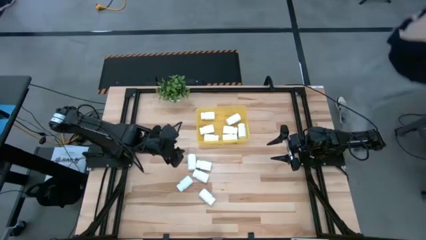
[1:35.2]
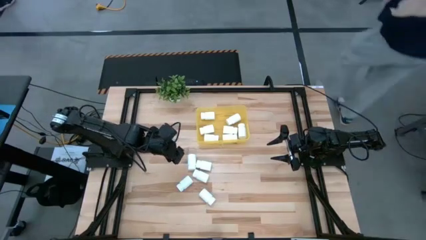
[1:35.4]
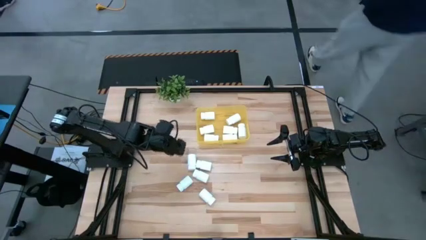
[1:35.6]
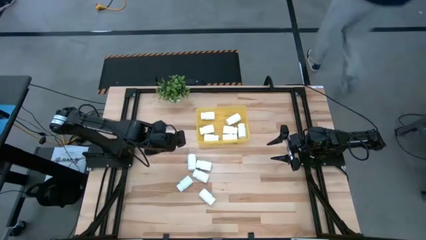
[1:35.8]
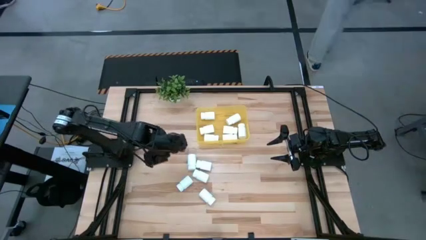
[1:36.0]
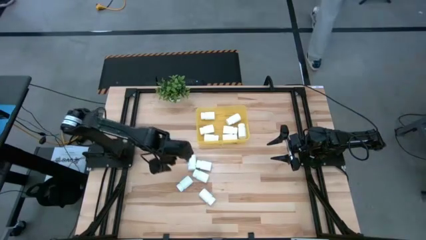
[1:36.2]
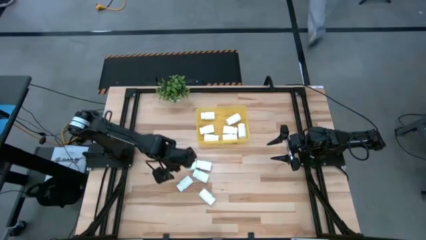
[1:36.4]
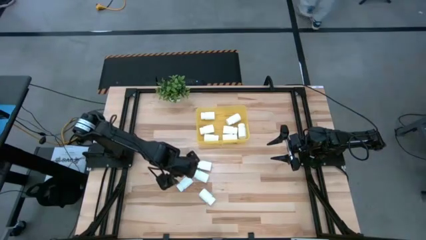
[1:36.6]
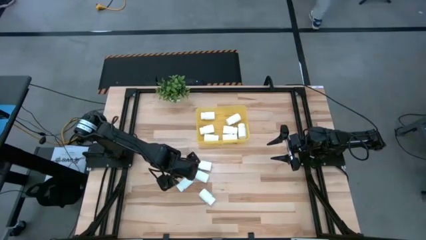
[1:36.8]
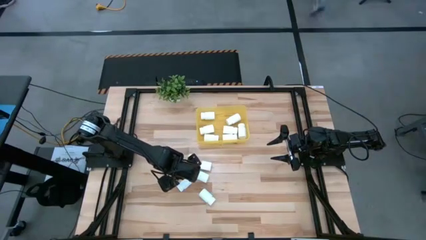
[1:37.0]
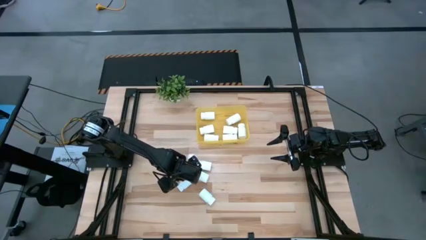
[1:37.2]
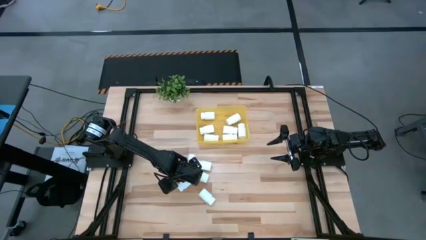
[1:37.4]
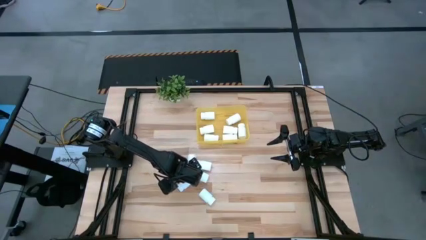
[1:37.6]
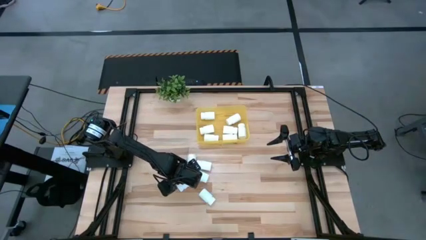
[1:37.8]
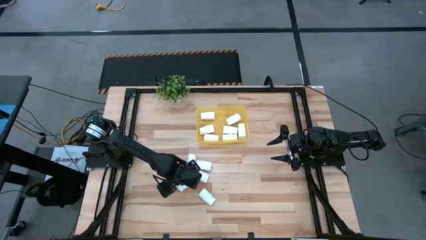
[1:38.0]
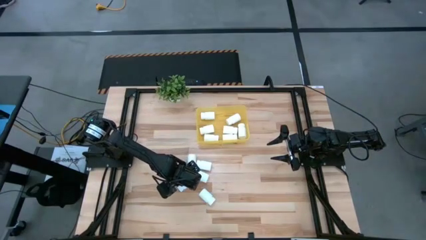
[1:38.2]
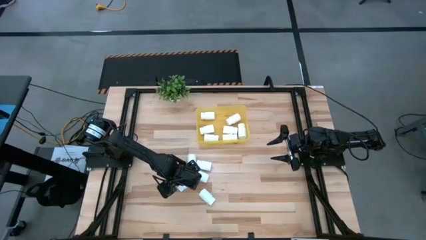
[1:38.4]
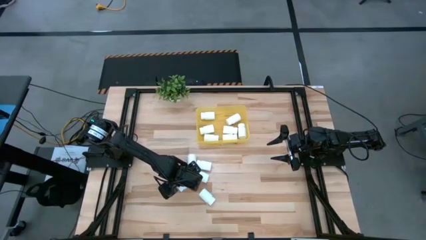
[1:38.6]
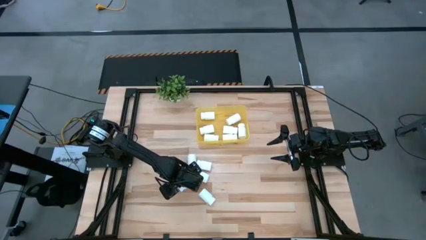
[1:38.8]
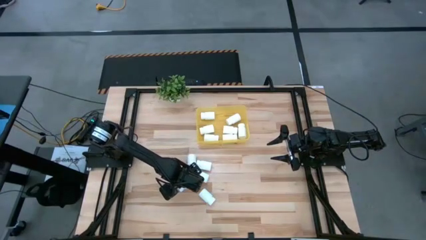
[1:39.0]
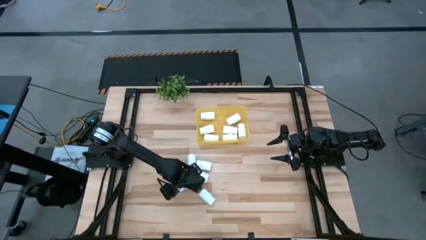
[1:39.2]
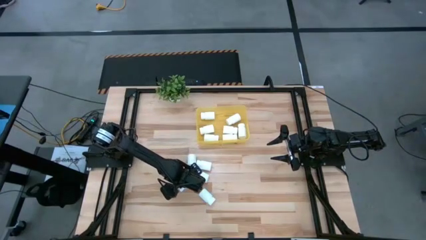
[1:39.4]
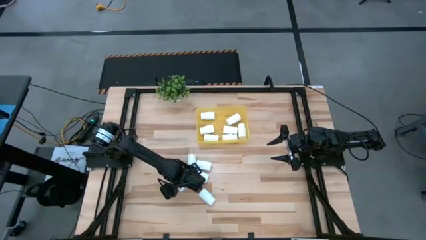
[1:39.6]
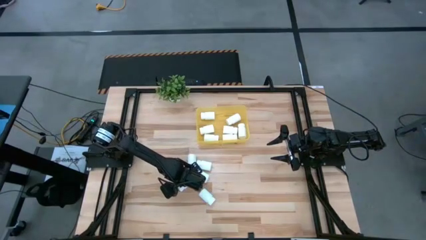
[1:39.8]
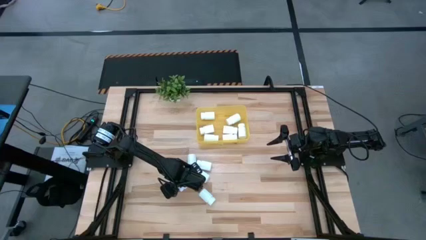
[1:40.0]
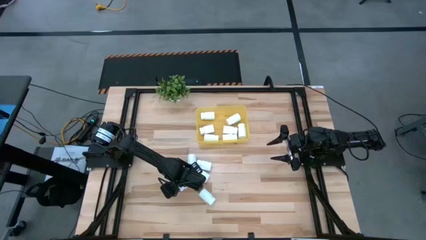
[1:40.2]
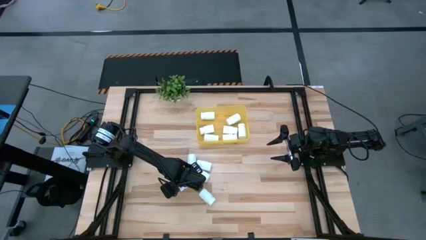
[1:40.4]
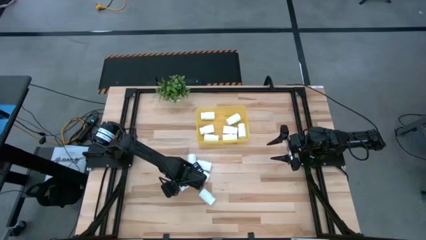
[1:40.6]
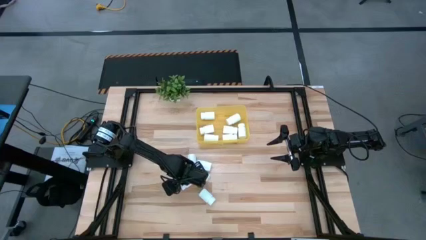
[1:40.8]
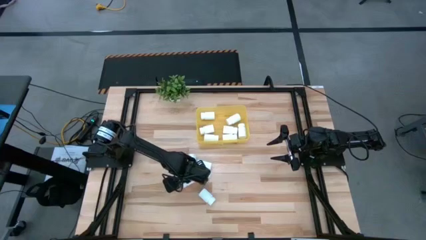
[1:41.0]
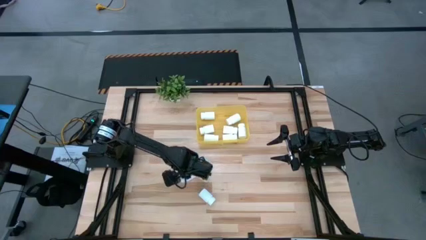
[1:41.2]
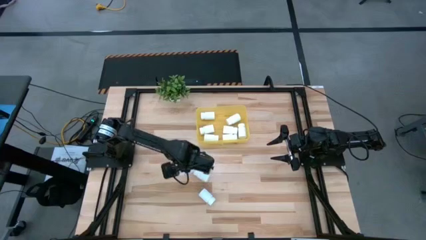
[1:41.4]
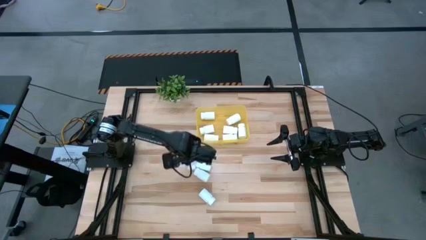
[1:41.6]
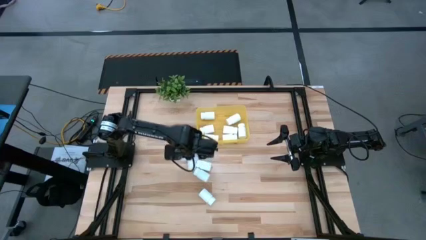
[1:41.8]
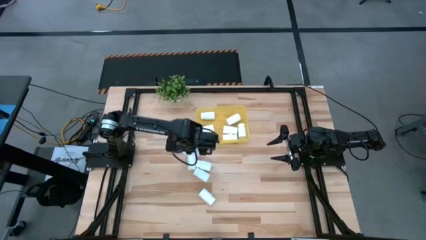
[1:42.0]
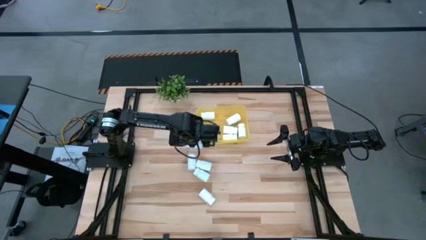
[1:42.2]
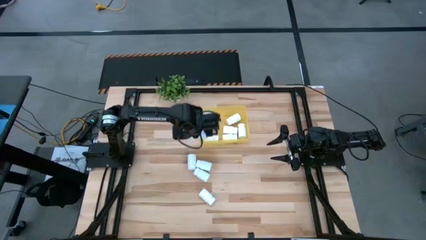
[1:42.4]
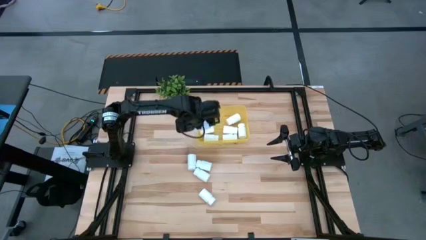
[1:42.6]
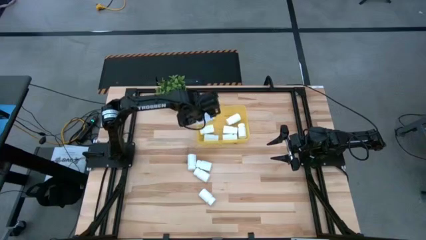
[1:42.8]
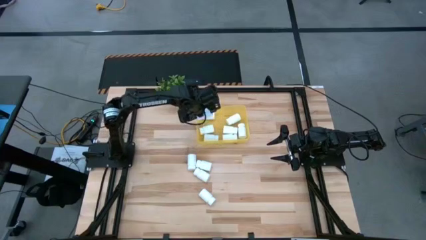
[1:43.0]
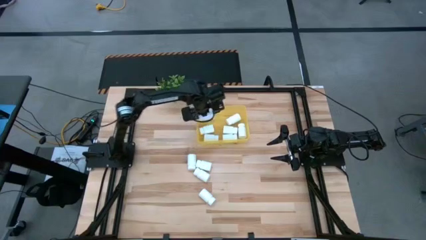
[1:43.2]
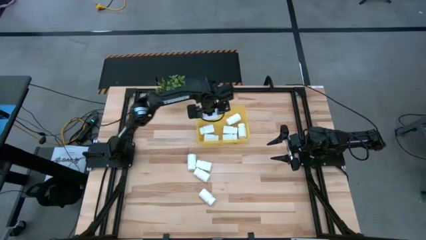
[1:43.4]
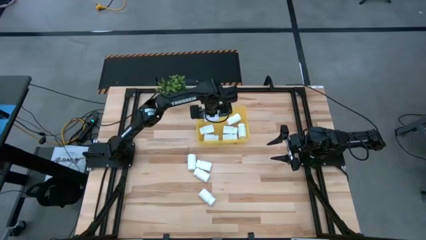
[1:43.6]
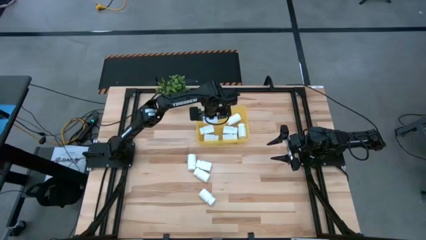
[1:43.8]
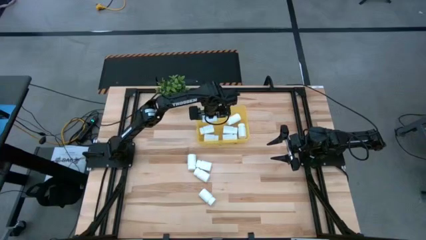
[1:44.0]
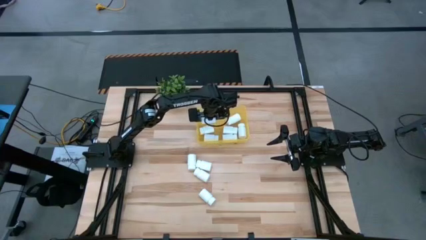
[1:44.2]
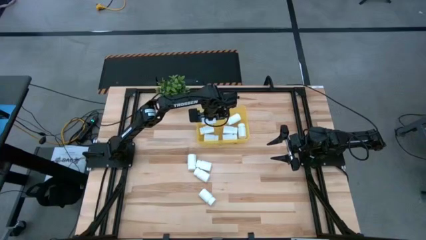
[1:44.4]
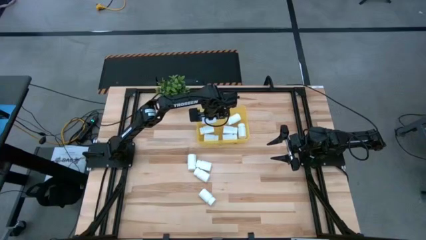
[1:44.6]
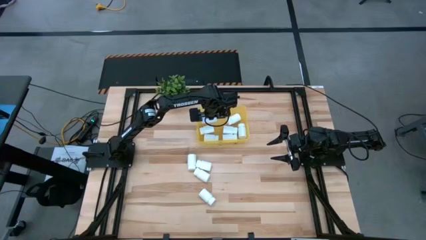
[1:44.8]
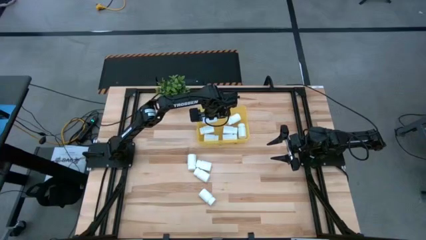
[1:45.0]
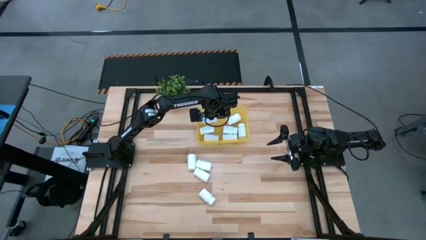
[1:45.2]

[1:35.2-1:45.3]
Task: Pick and place pill bottles into a basket
Put the white pill bottle into the yellow bin

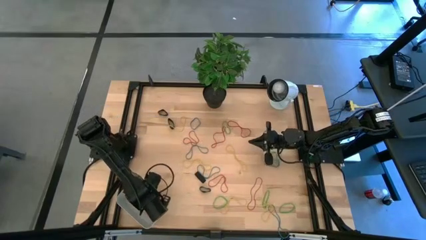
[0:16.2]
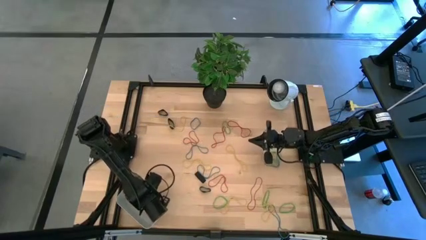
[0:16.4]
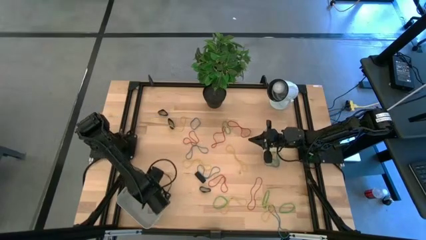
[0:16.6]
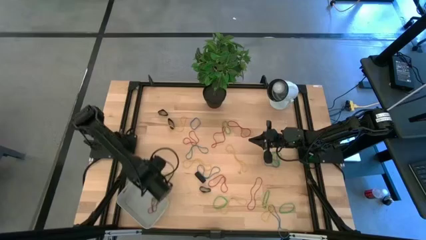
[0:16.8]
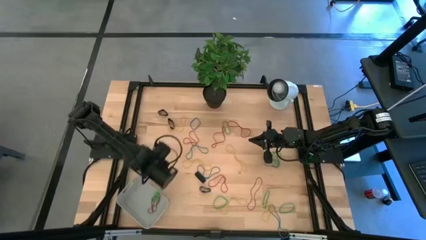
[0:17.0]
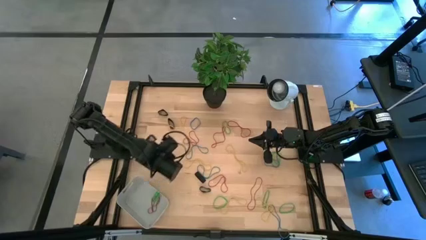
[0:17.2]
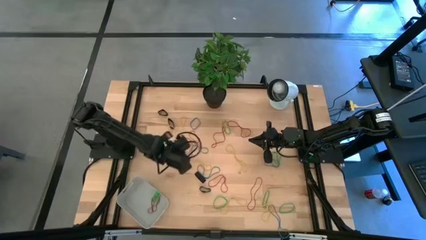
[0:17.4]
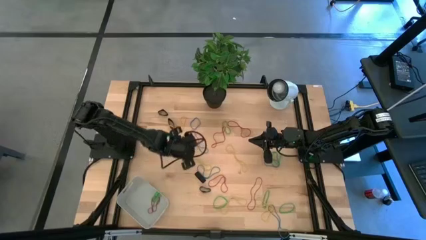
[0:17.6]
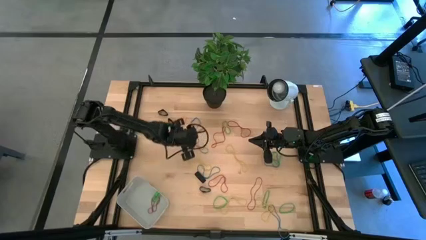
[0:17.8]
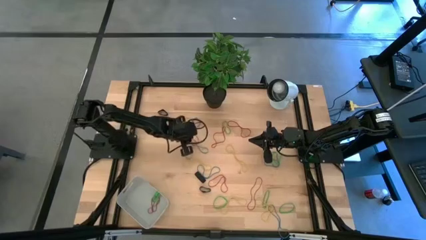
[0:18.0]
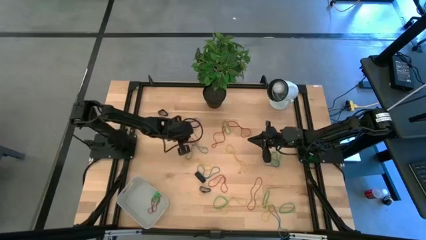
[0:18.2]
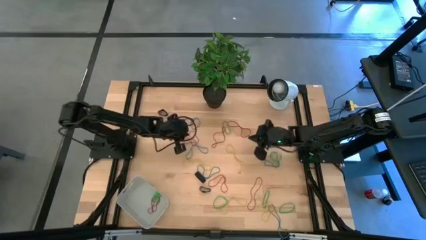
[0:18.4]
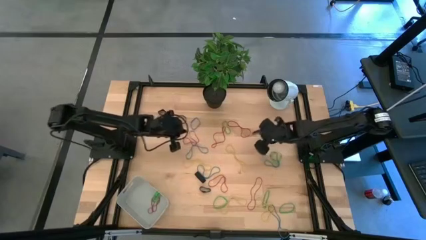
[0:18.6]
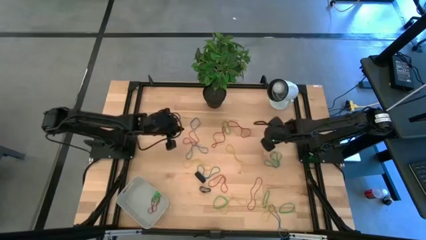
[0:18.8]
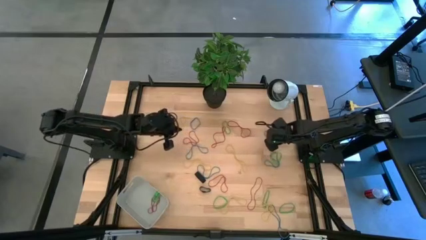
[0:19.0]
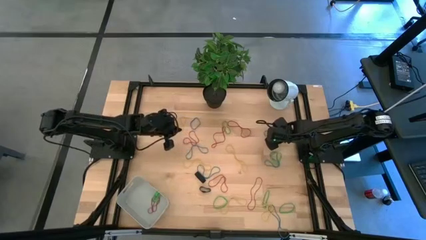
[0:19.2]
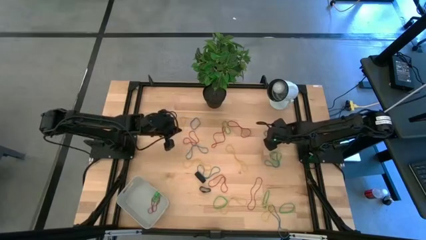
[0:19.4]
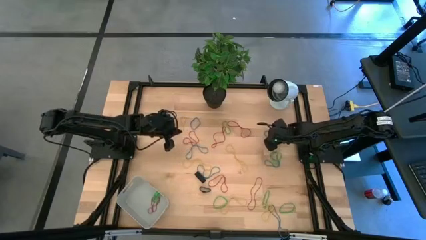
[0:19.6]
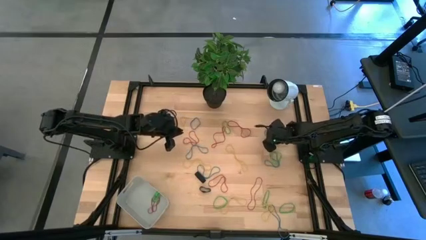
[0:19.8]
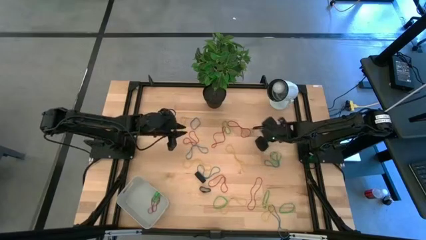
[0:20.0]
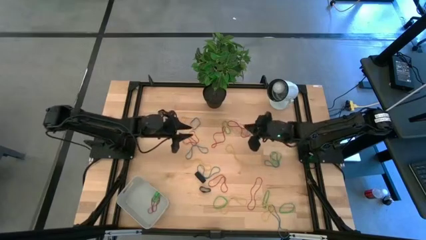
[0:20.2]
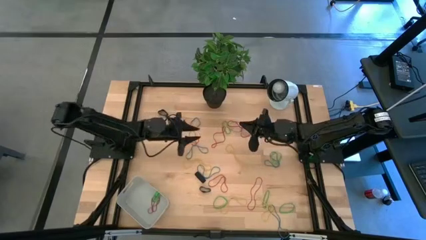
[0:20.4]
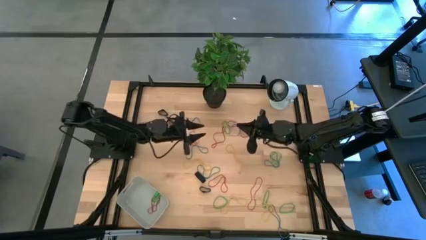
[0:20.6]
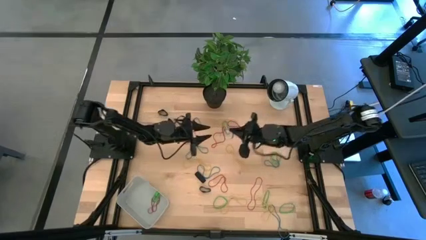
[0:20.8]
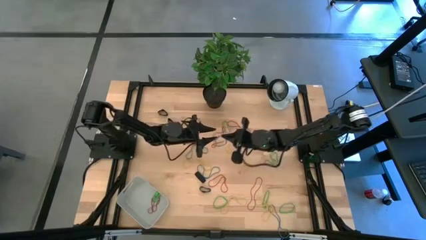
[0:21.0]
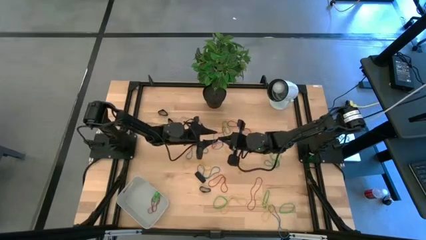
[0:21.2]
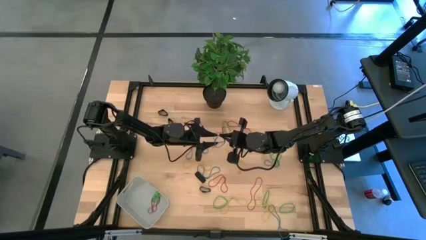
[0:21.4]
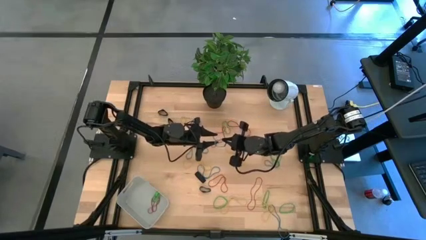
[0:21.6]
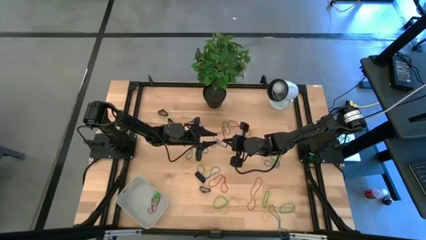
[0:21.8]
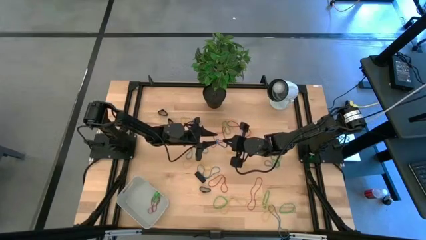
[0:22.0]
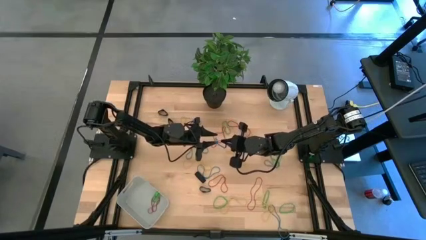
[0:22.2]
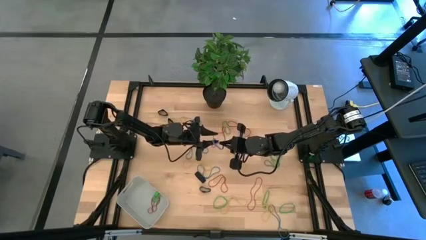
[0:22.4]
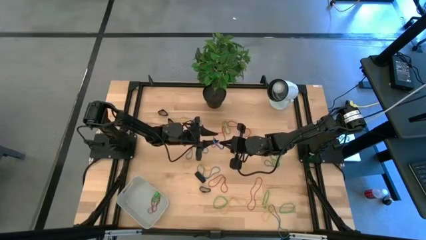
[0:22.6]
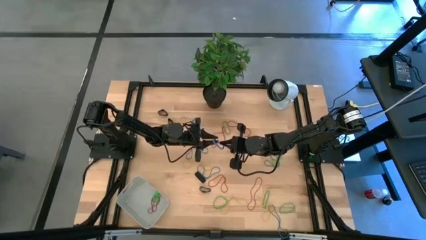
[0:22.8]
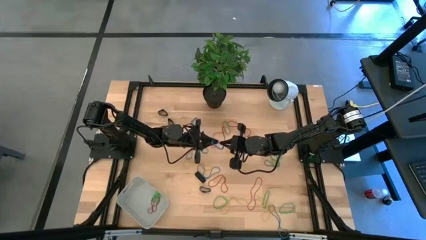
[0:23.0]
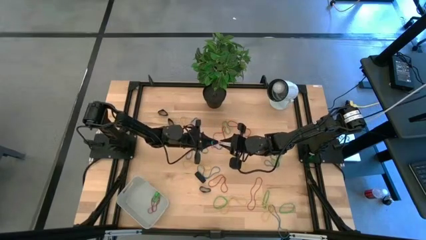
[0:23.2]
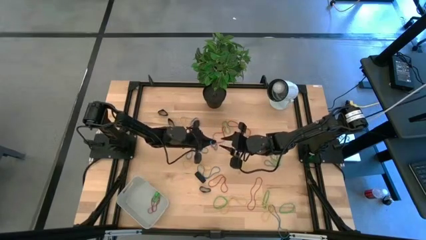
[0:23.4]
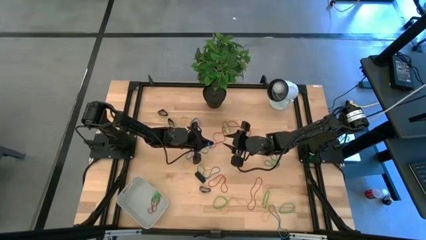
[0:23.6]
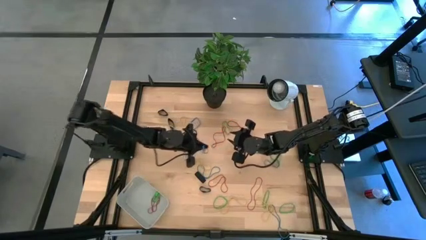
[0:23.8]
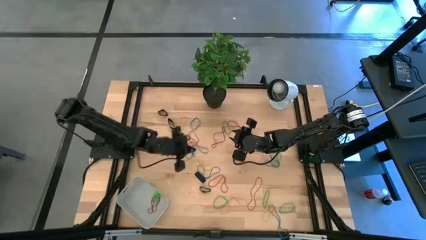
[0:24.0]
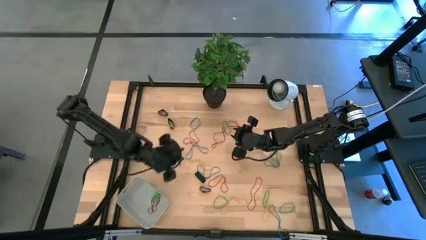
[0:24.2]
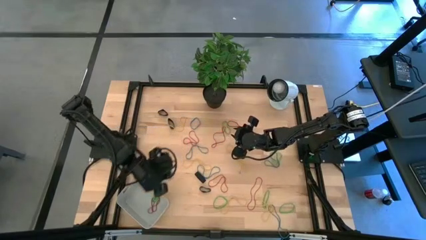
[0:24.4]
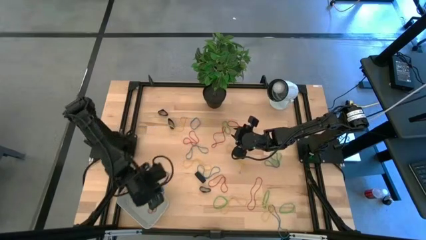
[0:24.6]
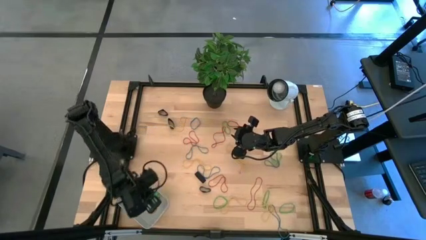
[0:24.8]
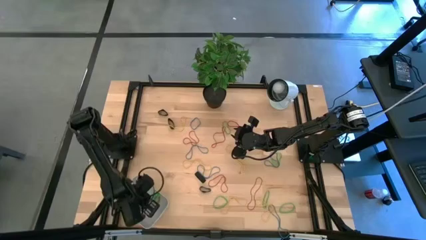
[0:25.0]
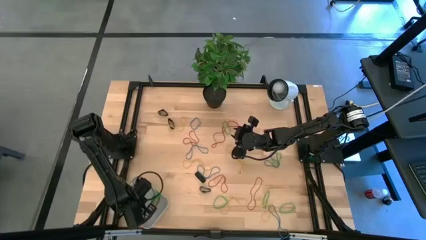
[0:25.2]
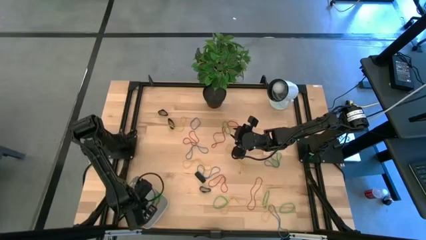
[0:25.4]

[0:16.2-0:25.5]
Task: Pick and place rubber bands into bin
Put the blue rubber band into the gray bin
